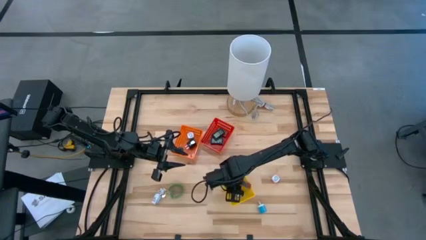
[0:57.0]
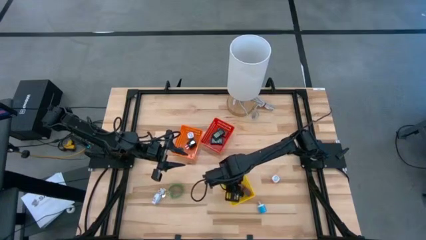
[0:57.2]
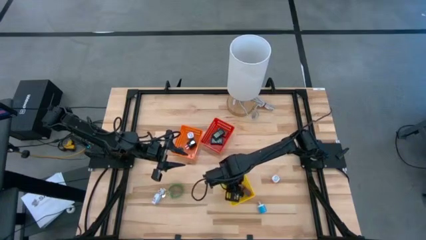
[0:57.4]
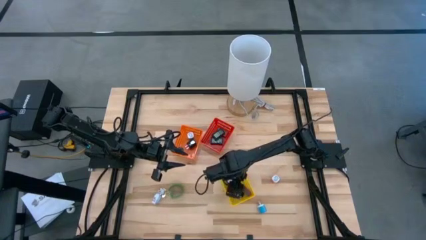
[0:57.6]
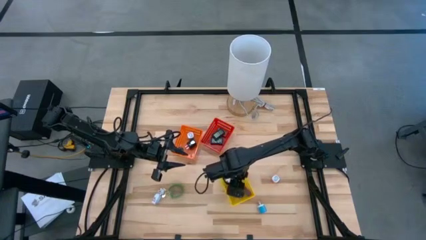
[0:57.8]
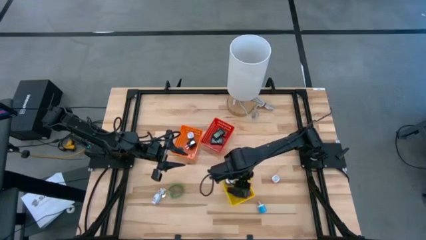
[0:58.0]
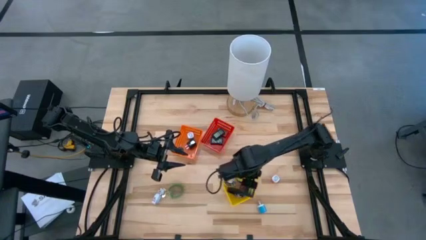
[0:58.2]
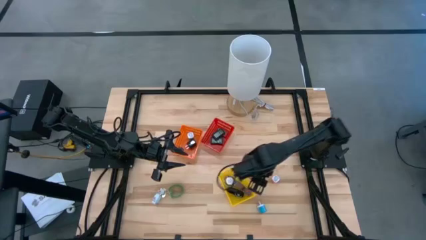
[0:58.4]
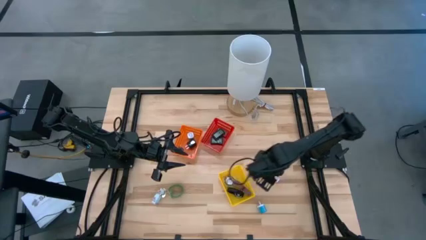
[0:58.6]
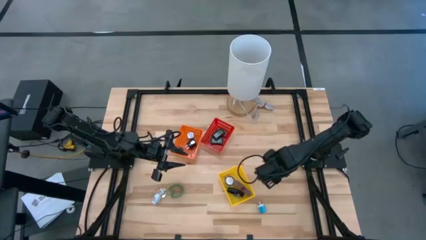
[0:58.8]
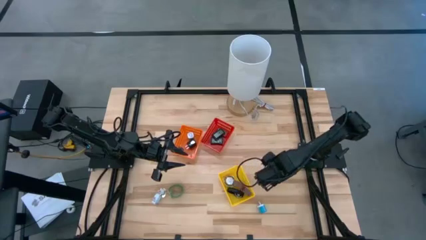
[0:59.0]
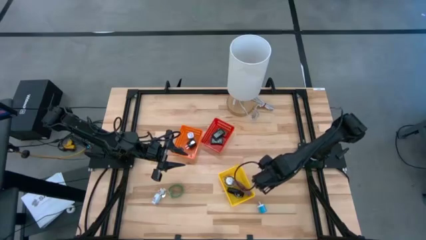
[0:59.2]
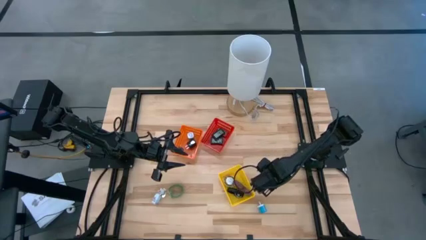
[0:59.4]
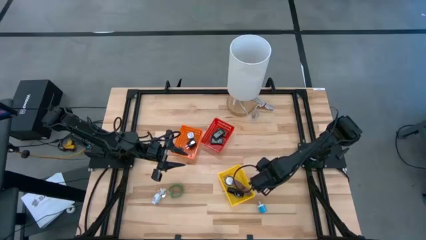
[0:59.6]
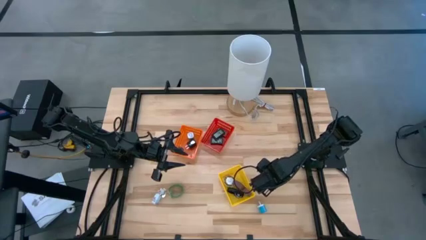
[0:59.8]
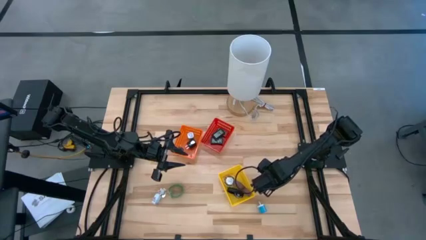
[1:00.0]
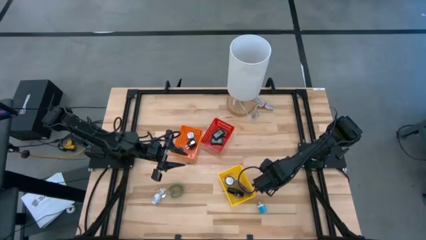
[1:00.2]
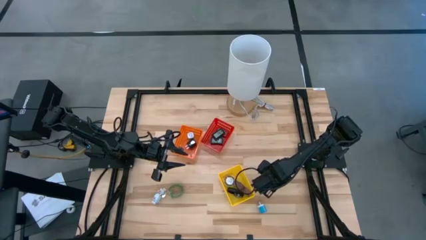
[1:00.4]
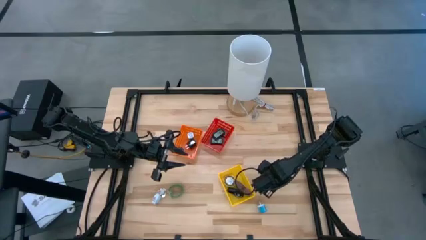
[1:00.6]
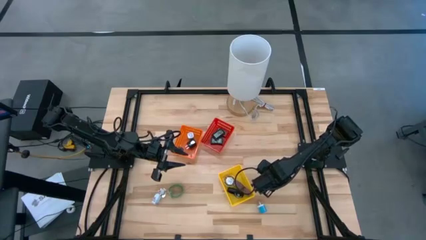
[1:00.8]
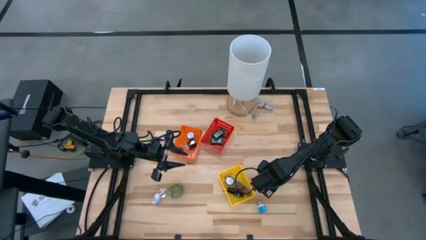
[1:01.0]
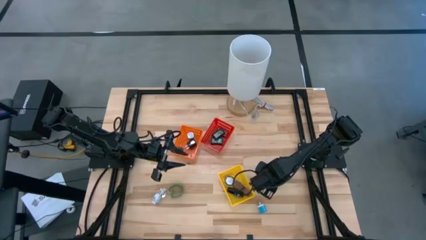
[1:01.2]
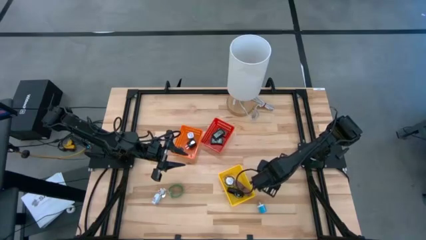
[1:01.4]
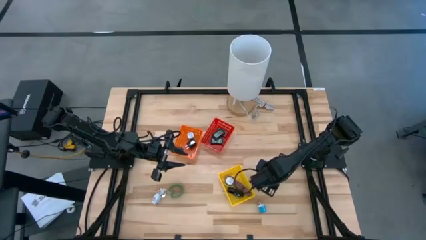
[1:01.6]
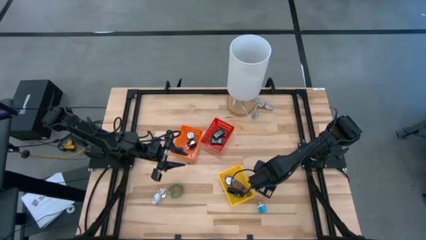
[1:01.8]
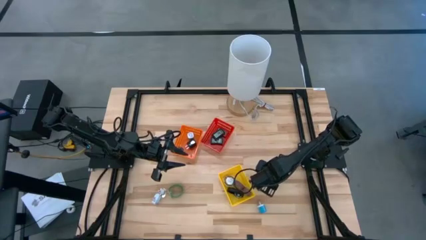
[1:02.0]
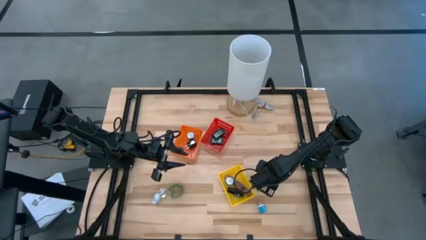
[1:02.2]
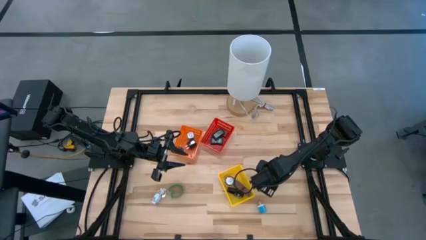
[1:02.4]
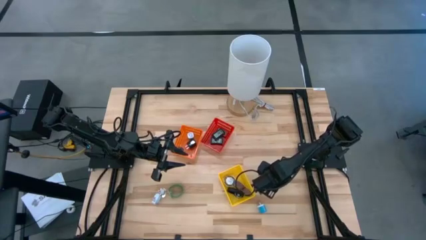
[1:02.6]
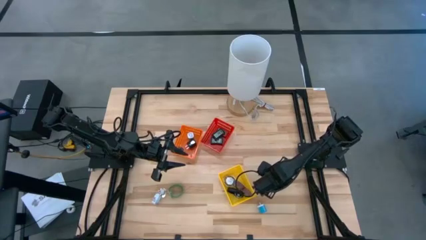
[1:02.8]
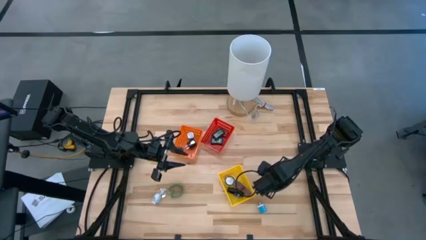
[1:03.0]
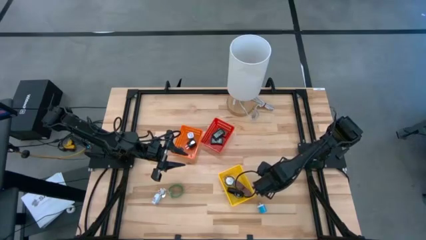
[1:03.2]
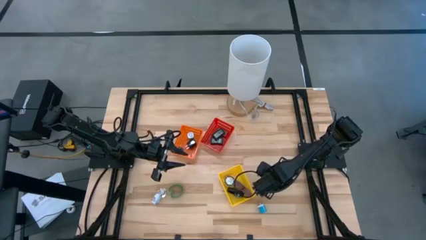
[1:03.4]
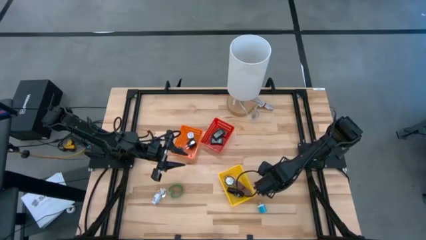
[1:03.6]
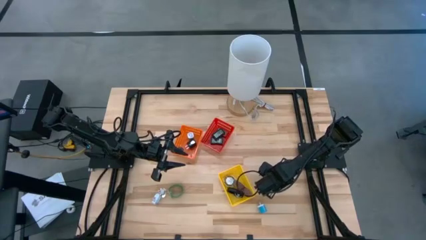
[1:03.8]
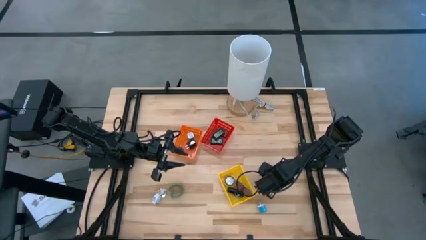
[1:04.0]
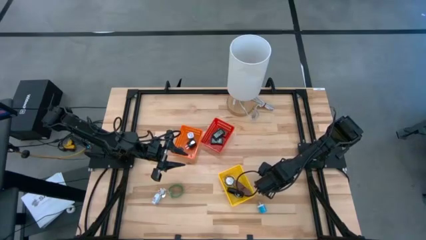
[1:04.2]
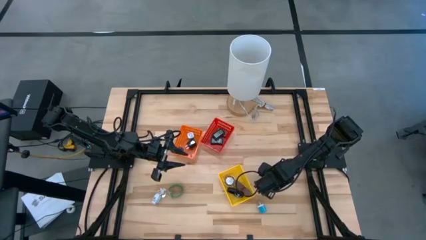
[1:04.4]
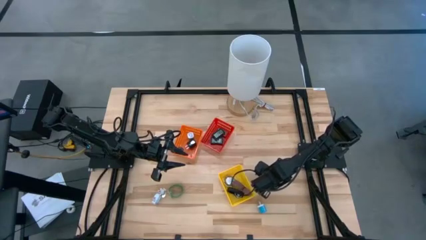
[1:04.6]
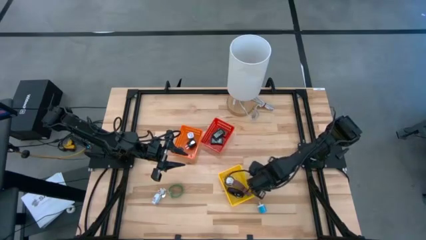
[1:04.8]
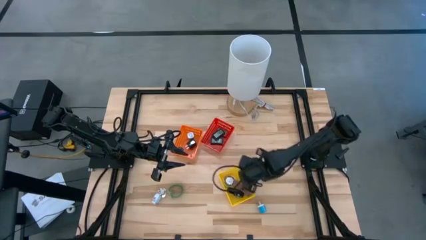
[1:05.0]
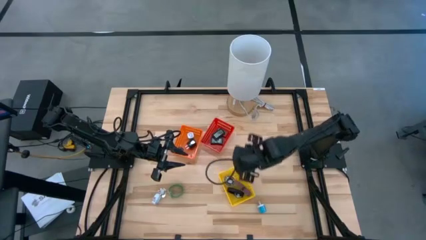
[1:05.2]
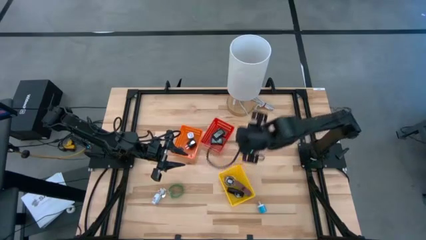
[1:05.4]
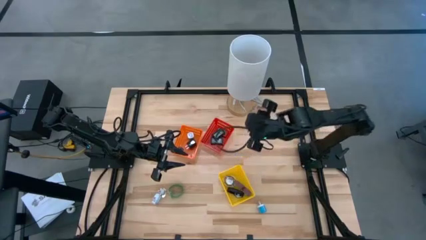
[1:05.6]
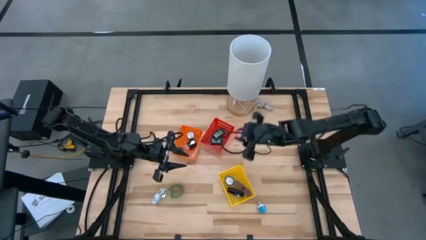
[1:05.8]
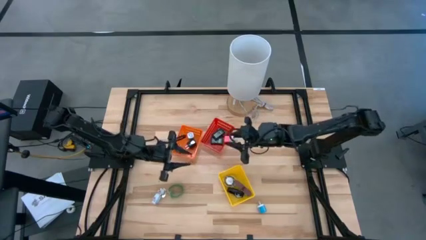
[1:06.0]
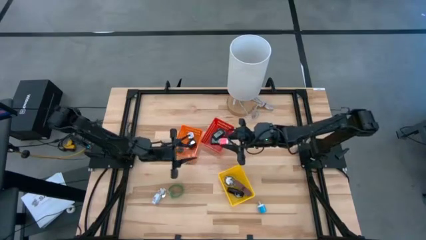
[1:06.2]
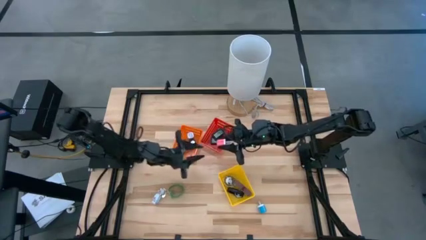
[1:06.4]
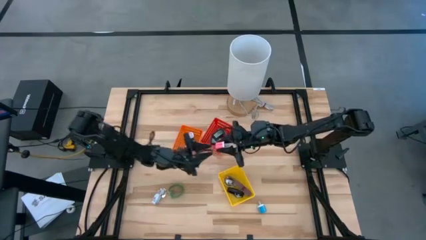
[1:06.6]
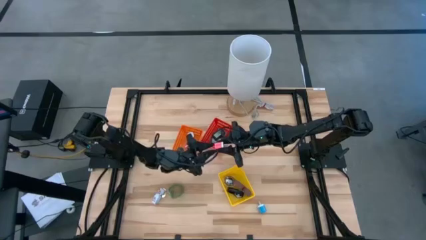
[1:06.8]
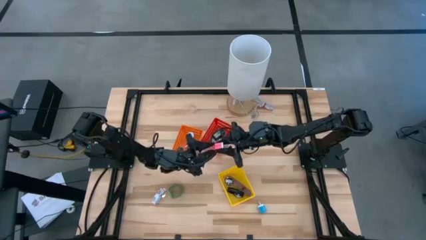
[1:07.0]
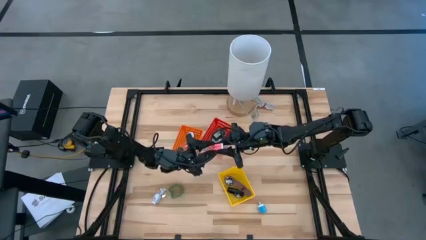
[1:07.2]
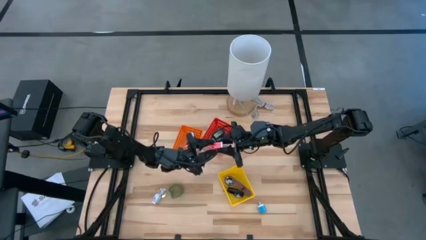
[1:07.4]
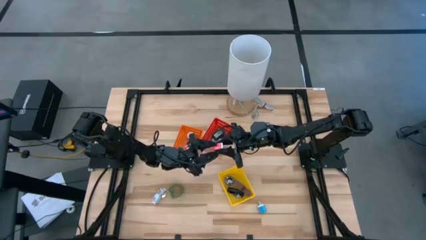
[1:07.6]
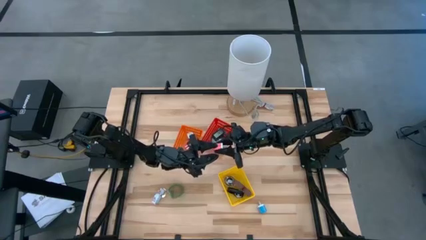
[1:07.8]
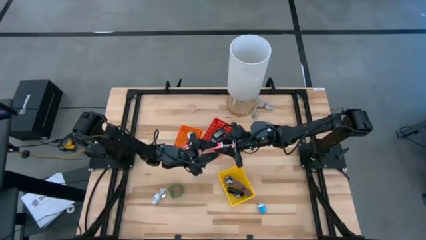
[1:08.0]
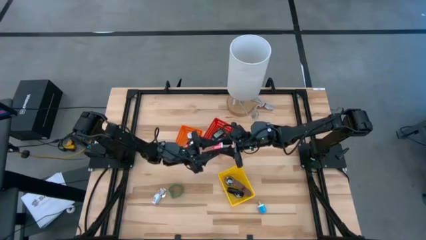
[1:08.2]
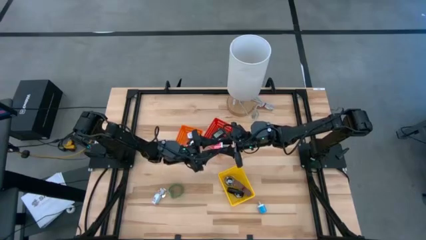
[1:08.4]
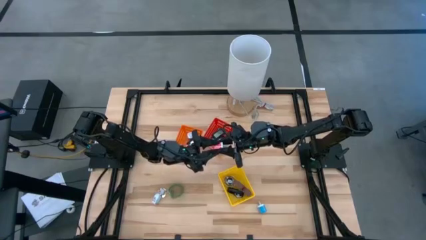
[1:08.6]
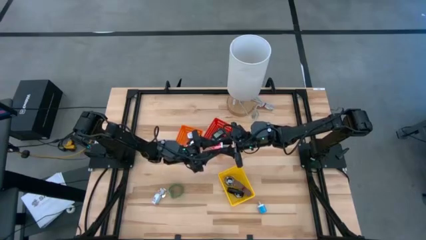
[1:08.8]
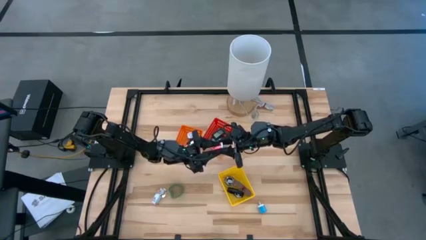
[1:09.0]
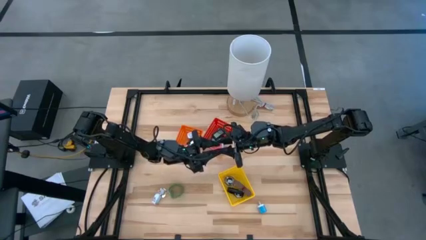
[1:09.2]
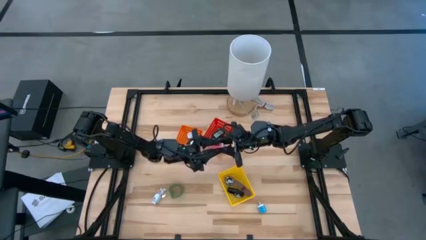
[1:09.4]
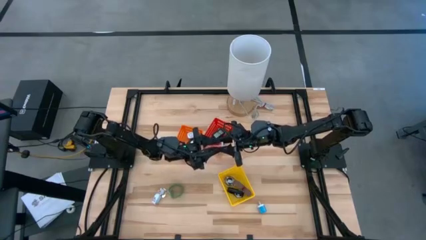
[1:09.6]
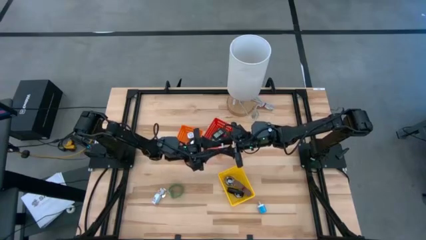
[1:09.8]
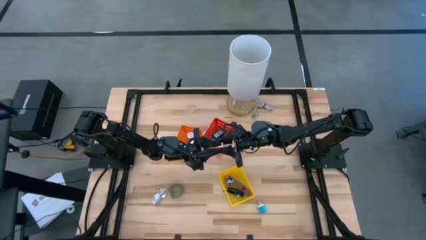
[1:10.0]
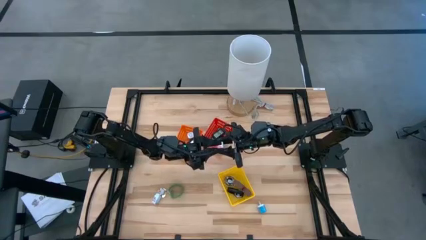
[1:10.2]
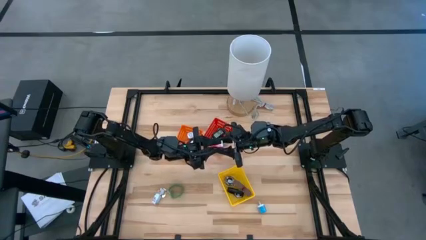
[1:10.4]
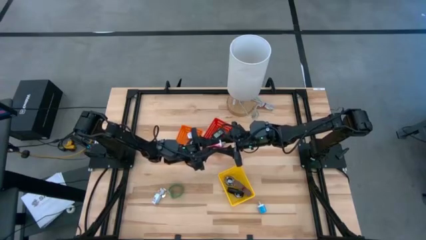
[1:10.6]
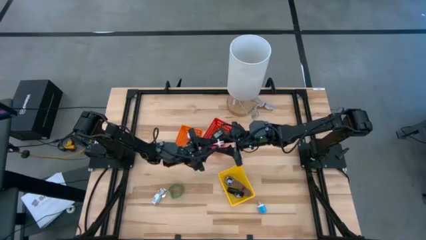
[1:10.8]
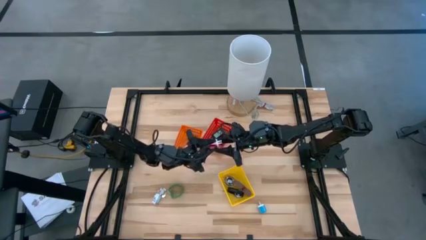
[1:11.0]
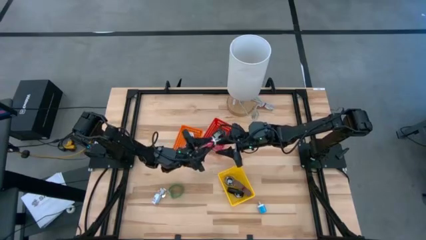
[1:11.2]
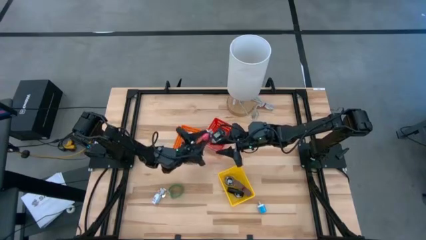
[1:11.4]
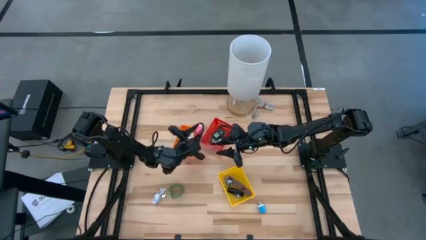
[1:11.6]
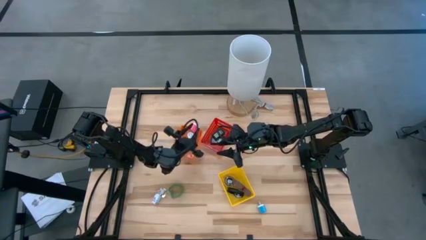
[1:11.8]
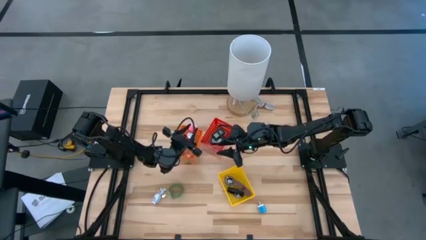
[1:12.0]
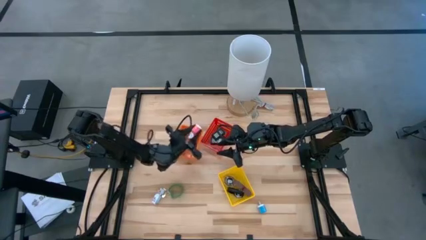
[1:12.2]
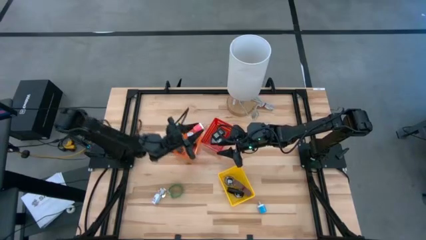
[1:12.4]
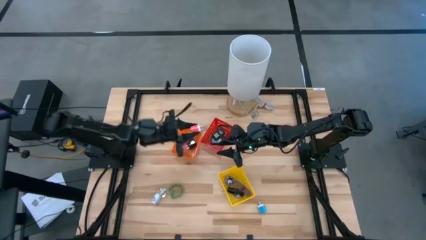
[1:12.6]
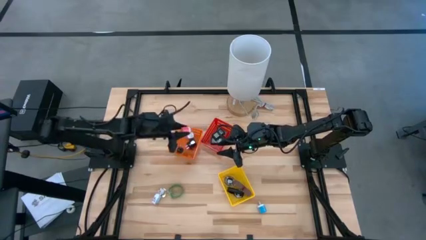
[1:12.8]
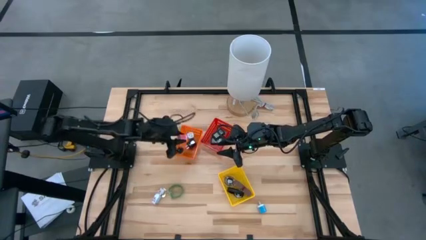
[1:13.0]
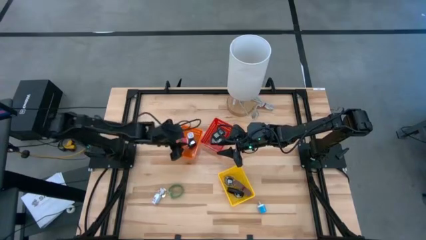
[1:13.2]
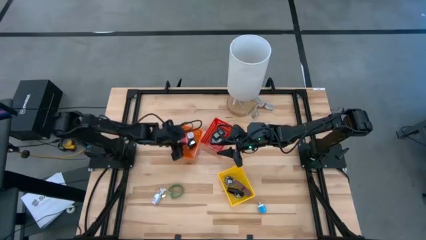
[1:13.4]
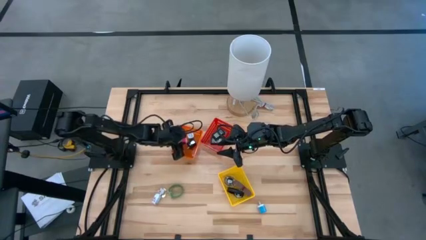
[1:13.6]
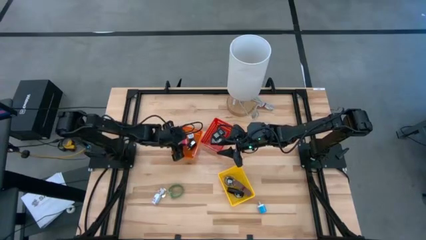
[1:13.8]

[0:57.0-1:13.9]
Task: Pick & Place Office items
Put the pink charger adapter into the orange bin
